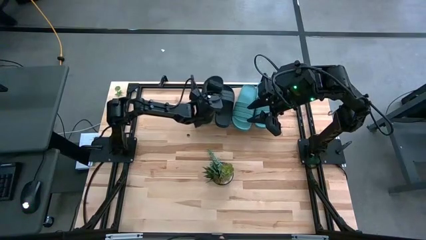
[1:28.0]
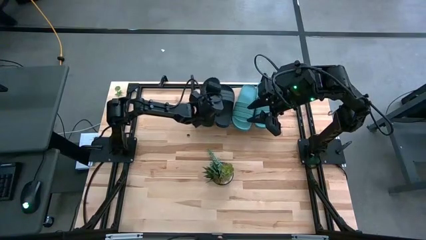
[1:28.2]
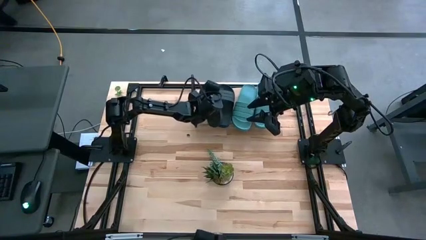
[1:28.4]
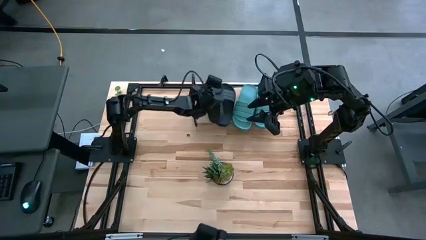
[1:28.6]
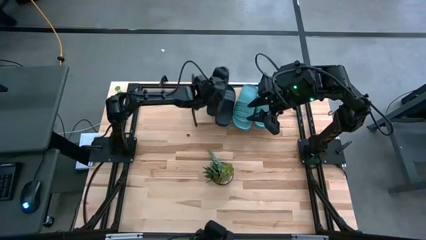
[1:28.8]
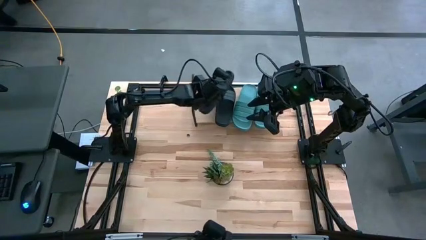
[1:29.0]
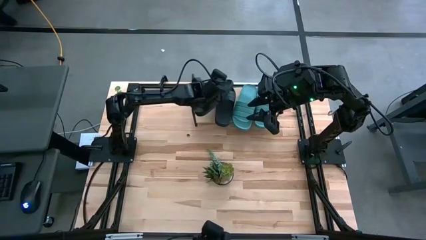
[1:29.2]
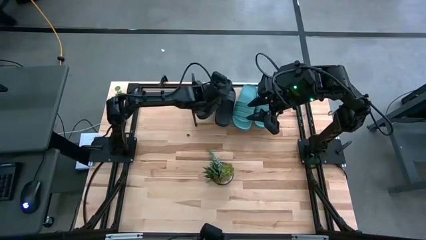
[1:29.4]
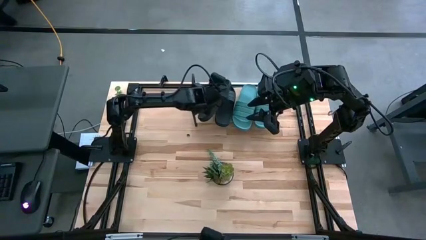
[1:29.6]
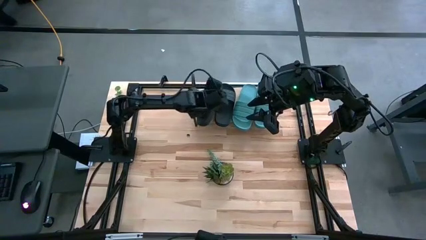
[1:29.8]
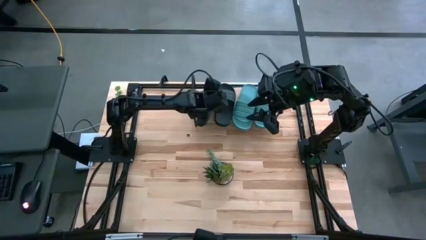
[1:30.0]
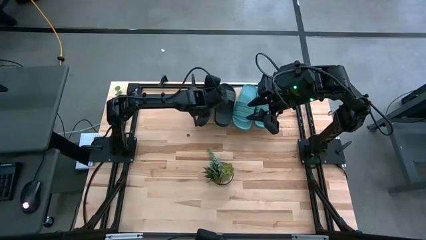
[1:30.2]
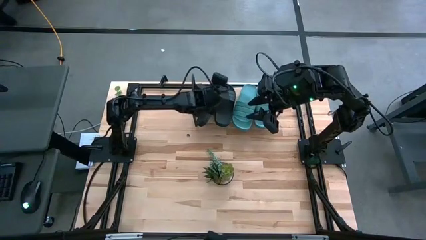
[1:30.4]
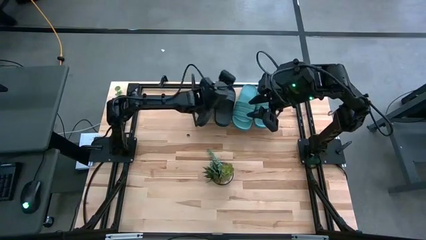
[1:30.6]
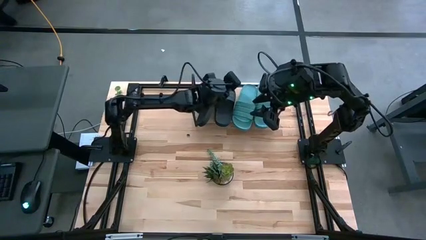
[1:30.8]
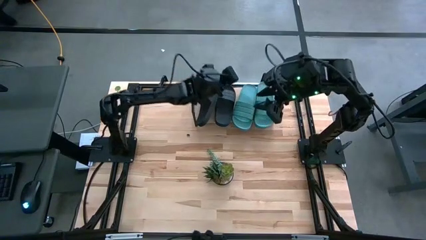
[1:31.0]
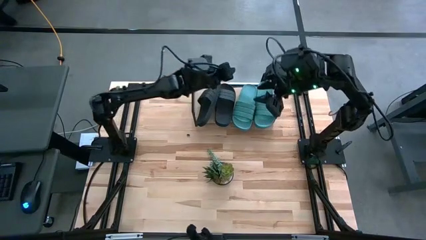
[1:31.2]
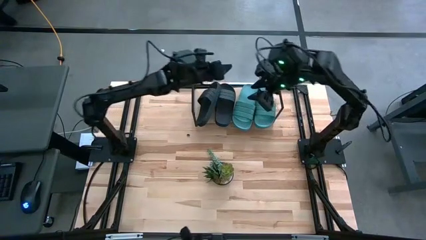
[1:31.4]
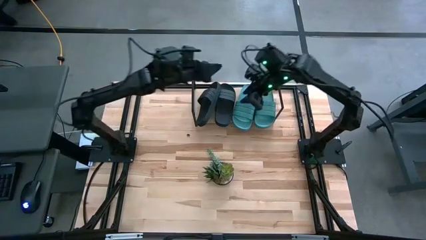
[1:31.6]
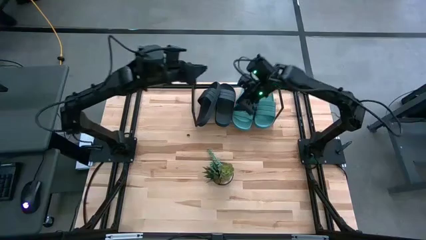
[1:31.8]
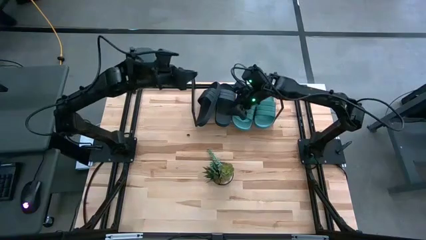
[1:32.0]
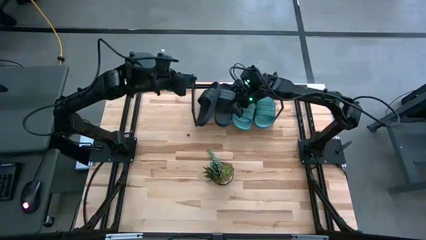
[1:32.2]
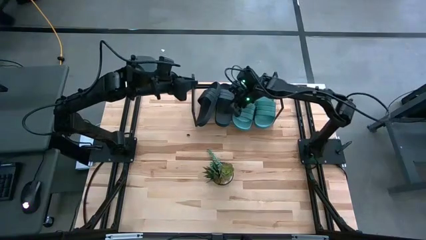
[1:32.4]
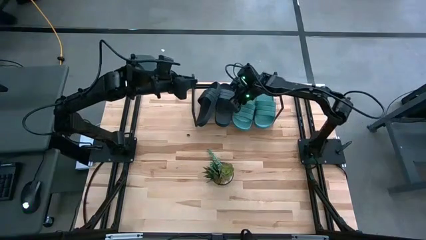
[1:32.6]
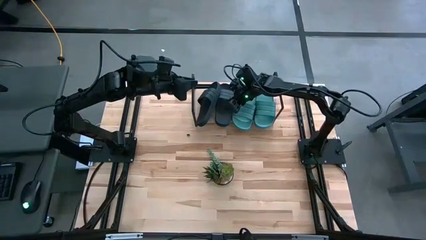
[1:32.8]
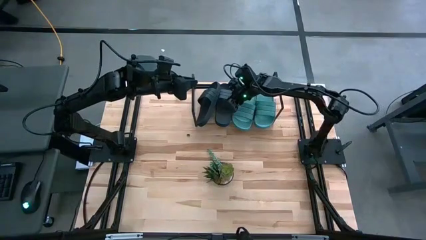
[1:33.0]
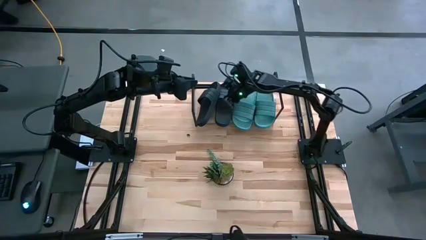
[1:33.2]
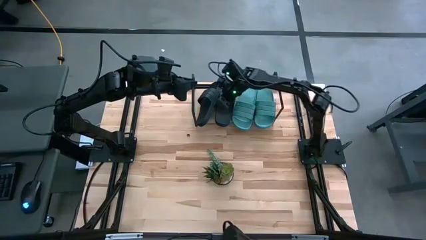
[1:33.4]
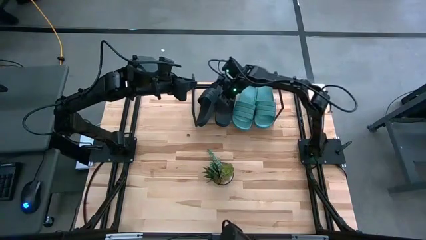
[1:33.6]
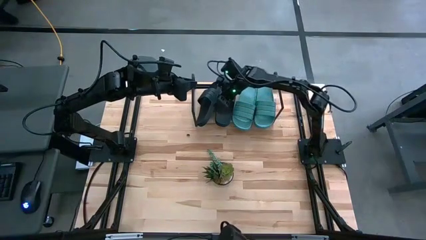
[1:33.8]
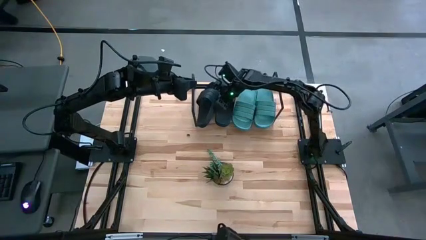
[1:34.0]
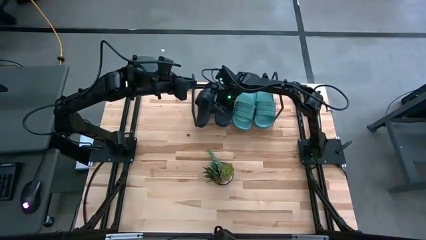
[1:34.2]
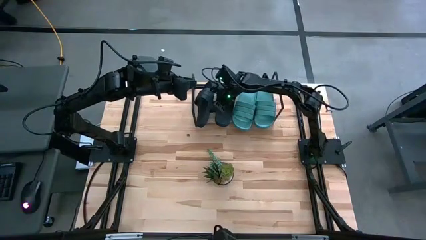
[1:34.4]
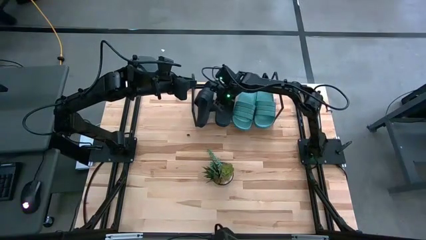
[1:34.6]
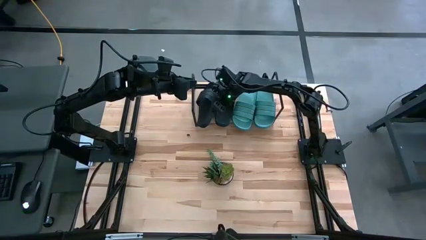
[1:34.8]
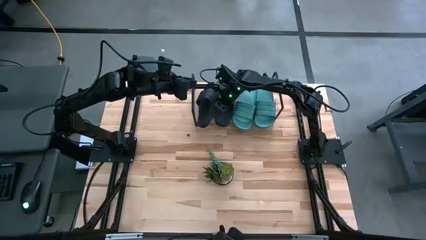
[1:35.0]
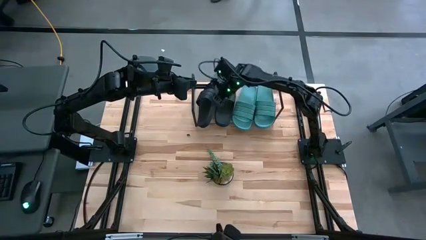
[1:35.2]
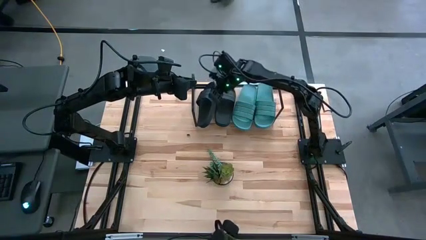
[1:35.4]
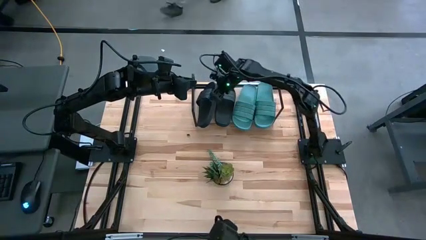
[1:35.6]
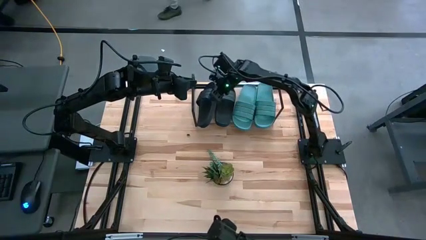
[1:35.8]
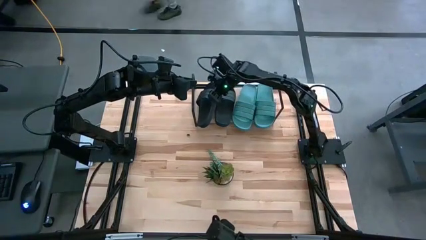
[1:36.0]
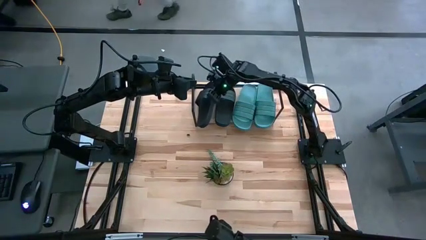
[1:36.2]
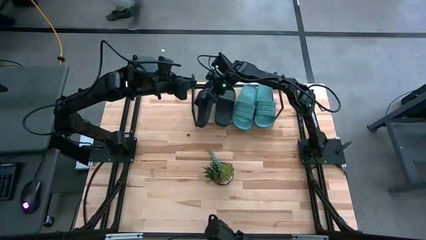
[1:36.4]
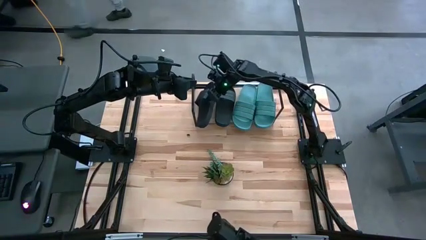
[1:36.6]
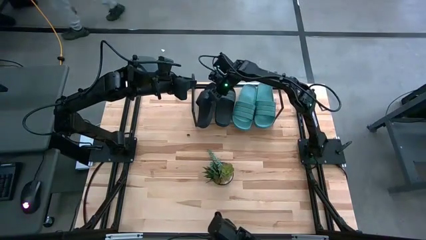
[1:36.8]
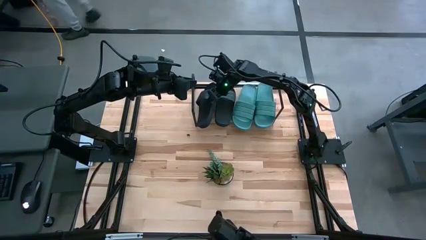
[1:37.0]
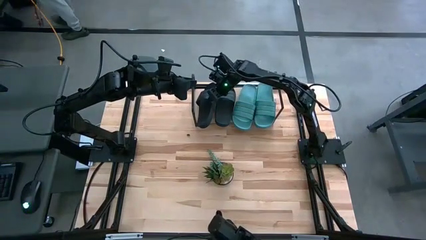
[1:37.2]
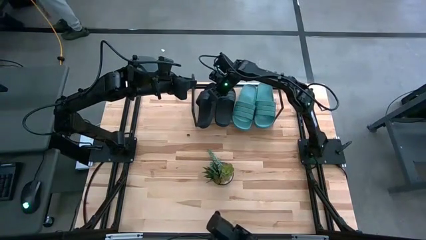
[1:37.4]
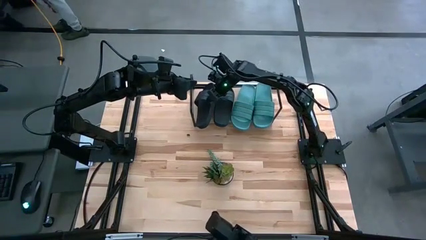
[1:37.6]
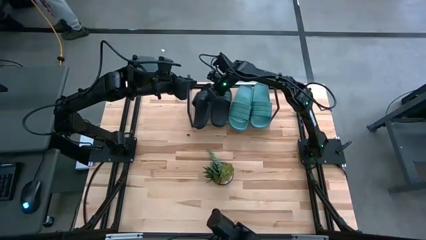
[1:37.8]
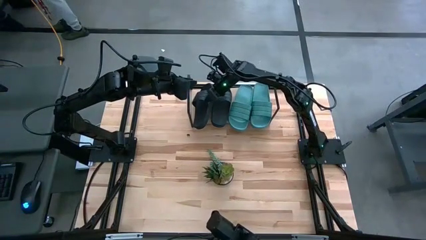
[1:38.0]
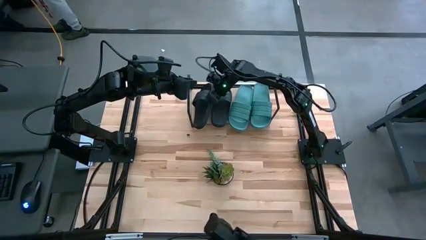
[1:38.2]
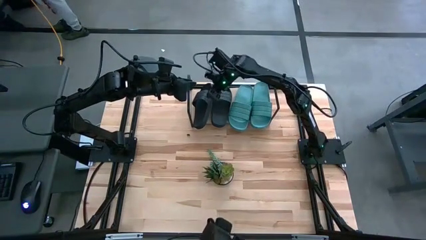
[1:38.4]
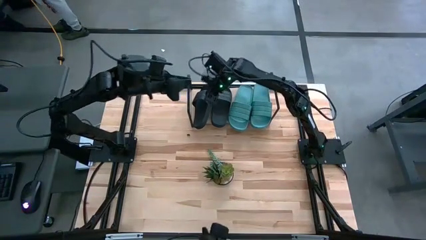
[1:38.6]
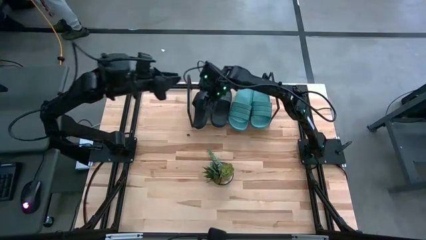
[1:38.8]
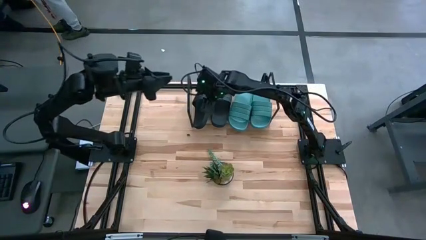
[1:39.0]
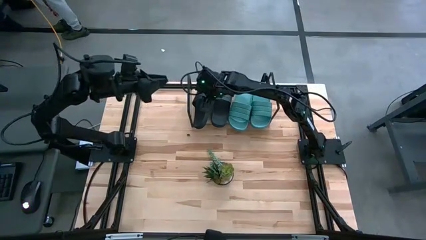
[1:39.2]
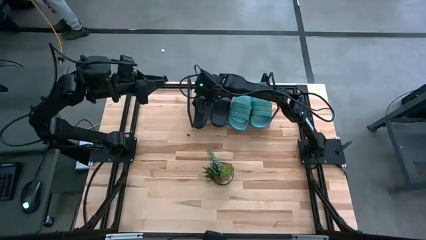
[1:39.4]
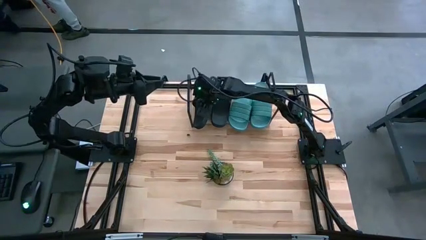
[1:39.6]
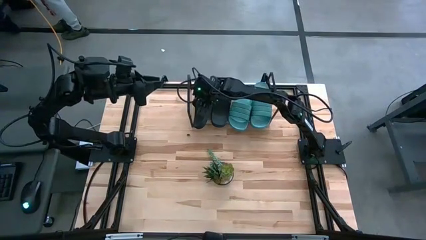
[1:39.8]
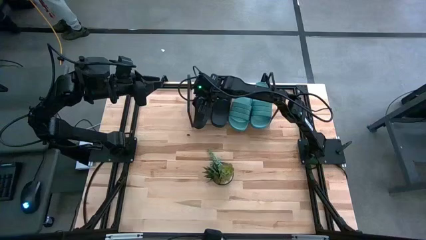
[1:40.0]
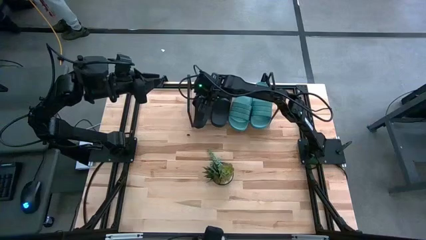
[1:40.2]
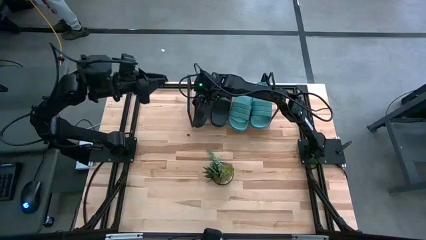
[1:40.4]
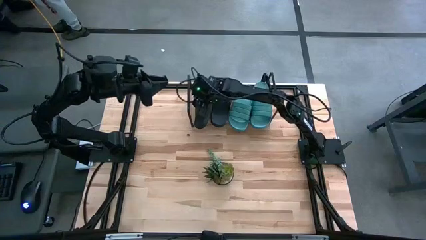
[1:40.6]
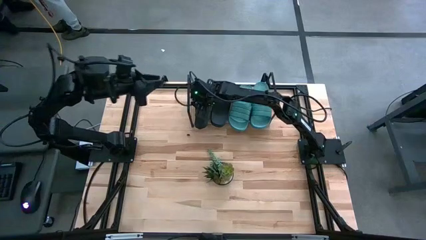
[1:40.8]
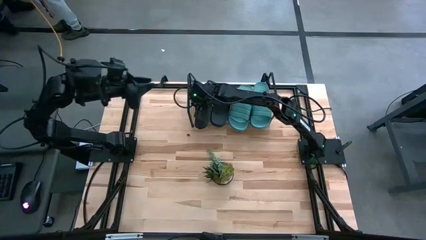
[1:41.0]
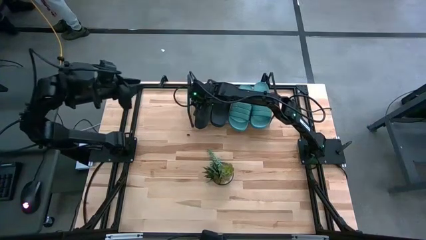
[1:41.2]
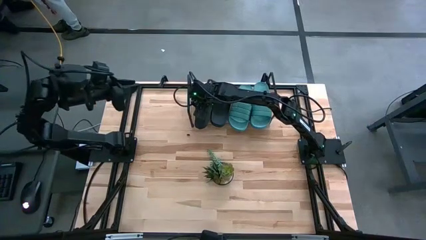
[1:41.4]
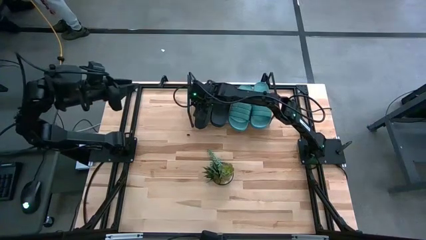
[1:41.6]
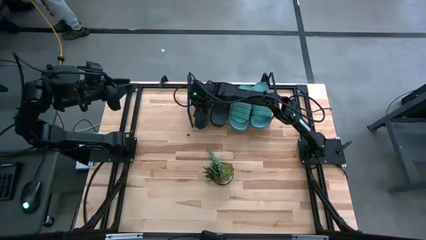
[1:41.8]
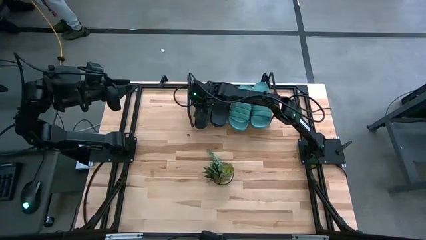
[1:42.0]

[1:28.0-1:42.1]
Task: Pick and place slides into the shelf
Put the black slipper on the shelf

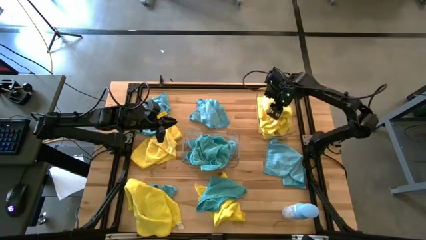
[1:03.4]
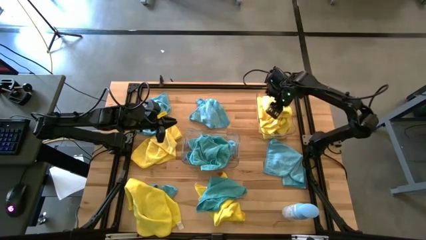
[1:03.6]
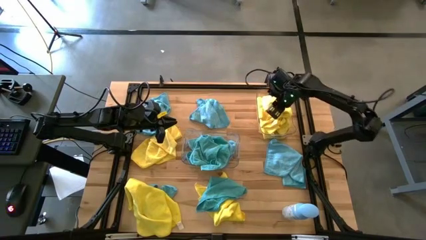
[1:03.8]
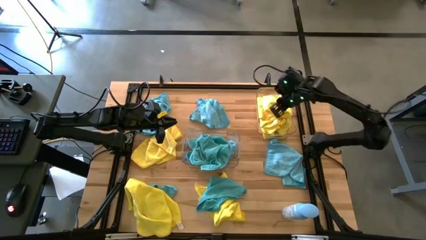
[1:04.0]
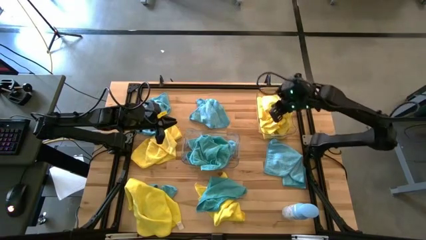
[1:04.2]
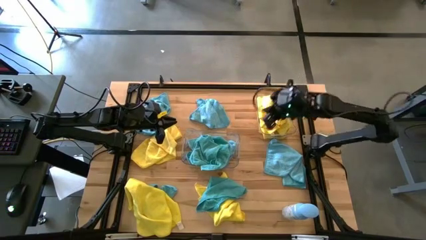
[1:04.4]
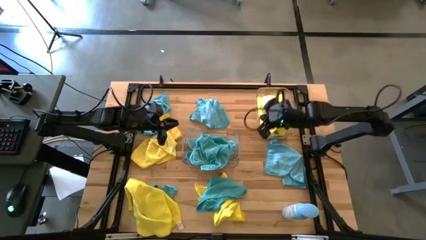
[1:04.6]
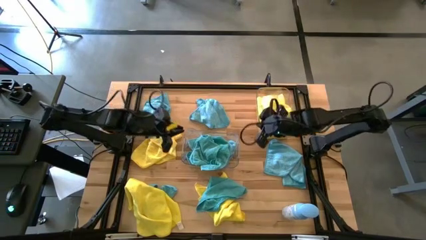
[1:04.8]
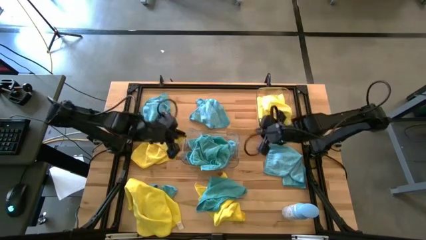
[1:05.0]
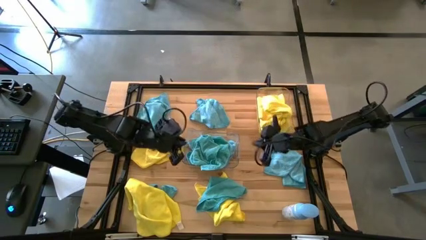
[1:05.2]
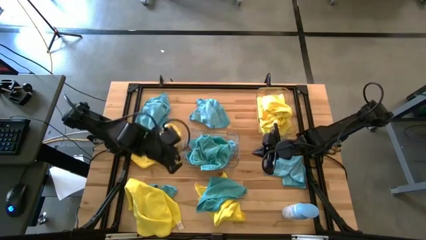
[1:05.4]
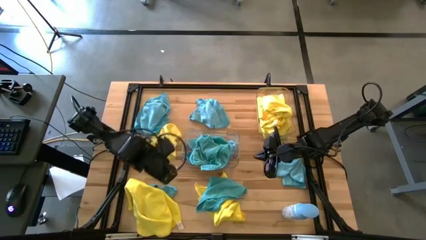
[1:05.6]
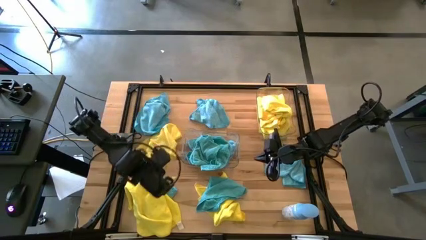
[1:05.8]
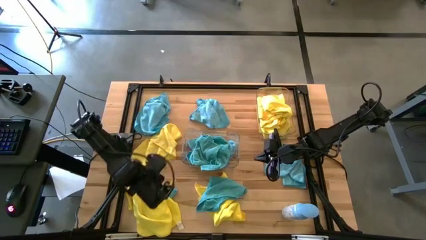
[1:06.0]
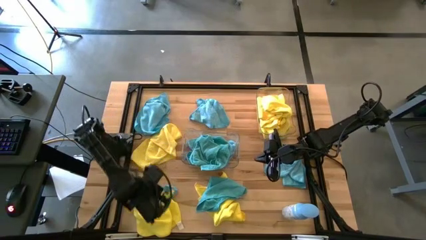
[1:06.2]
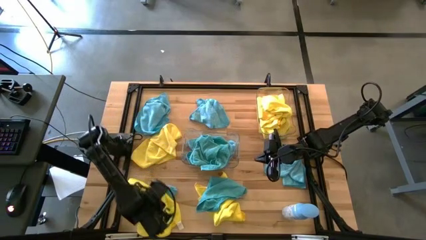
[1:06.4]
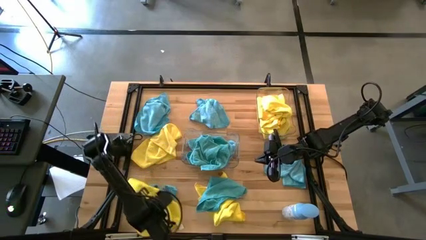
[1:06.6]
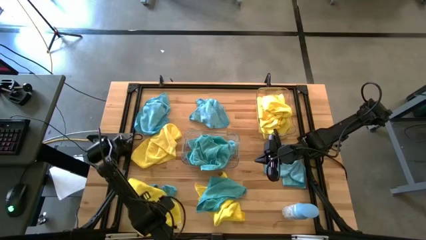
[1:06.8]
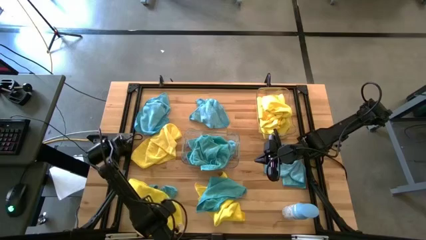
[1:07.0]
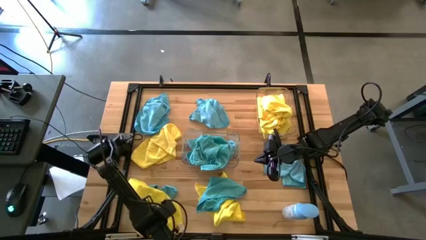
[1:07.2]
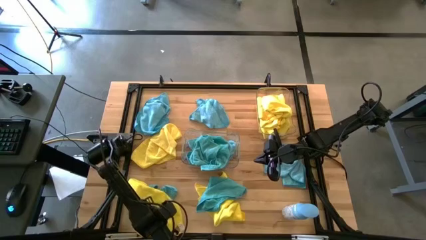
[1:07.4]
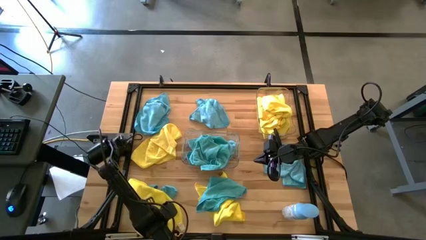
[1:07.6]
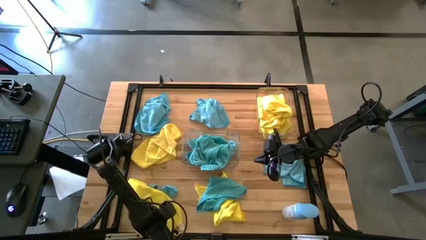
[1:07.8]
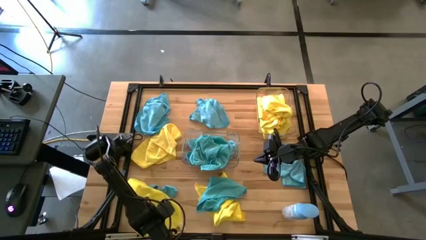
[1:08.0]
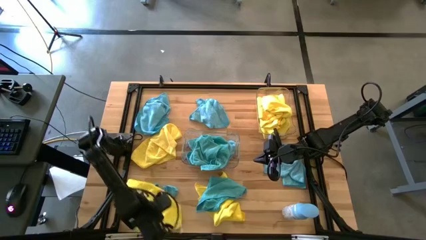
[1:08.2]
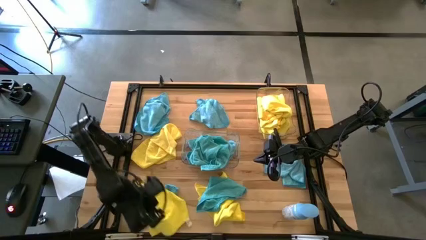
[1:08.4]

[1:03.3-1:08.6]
Task: Sort microfiber towel by color & place in baskets
Put the yellow towel into the top transparent bin
